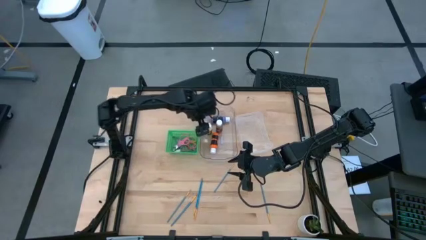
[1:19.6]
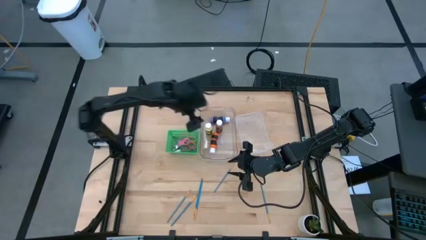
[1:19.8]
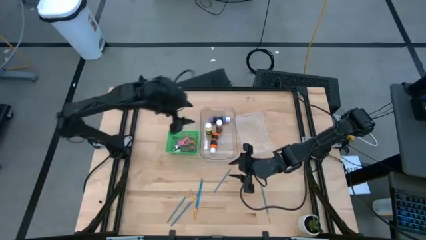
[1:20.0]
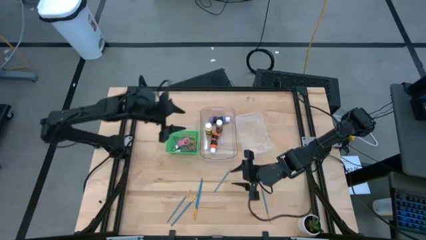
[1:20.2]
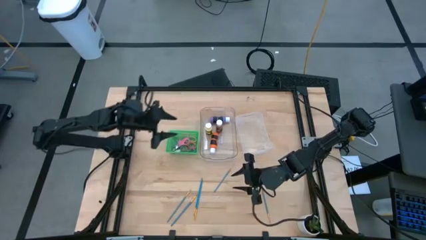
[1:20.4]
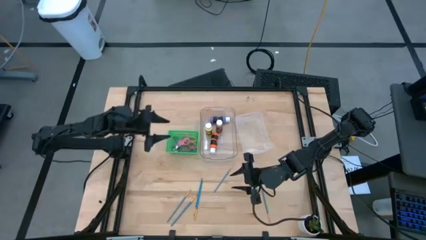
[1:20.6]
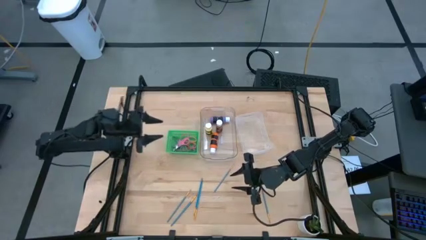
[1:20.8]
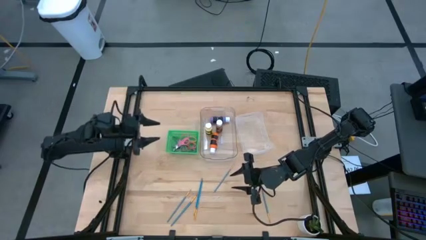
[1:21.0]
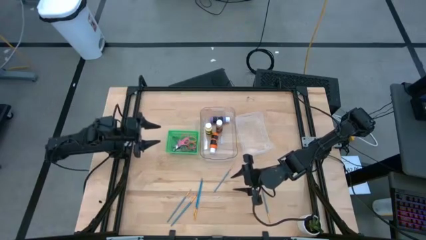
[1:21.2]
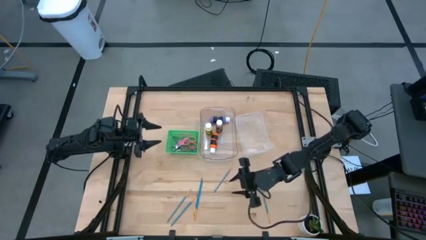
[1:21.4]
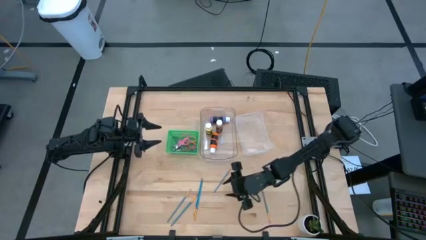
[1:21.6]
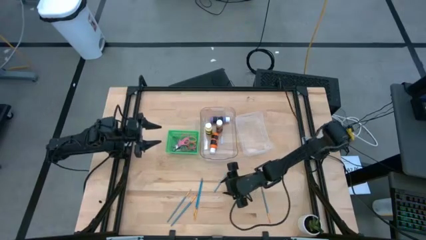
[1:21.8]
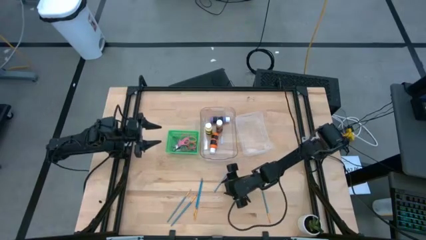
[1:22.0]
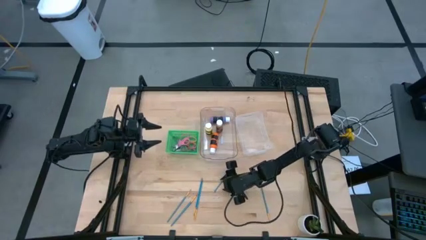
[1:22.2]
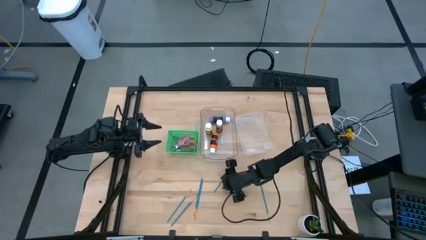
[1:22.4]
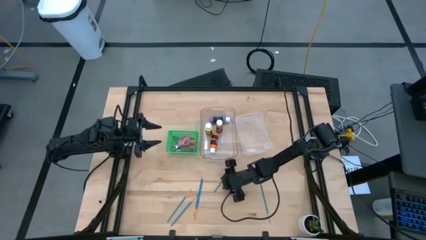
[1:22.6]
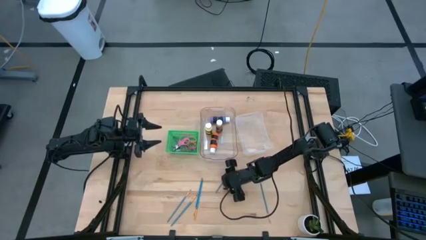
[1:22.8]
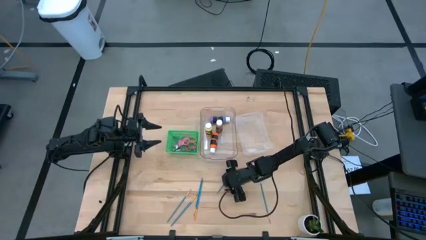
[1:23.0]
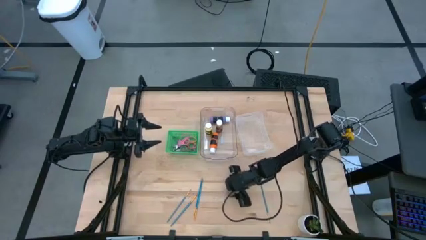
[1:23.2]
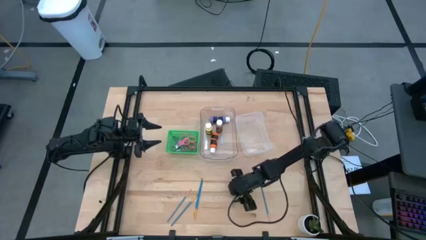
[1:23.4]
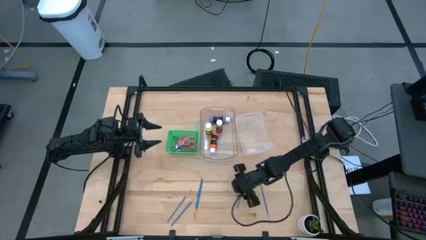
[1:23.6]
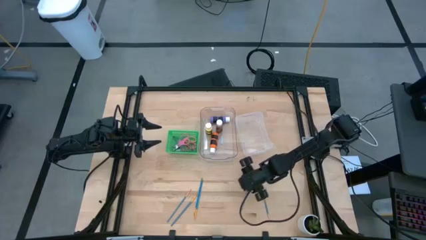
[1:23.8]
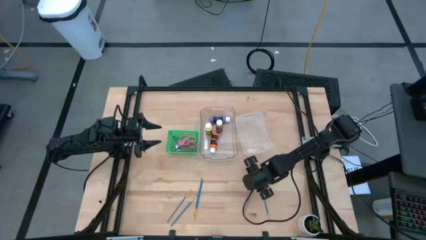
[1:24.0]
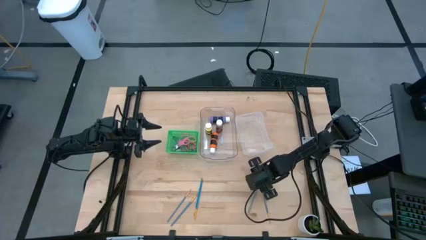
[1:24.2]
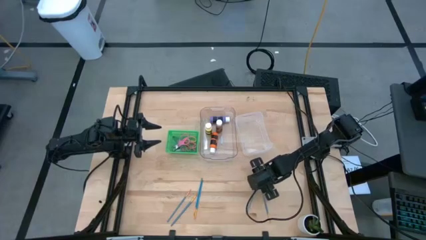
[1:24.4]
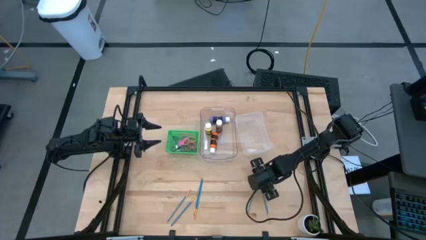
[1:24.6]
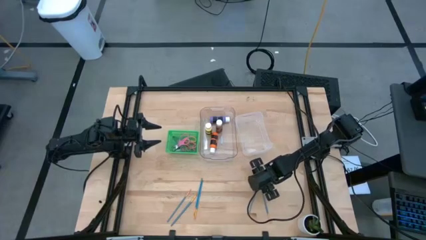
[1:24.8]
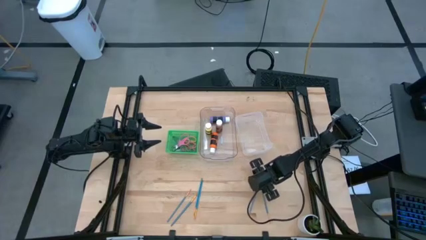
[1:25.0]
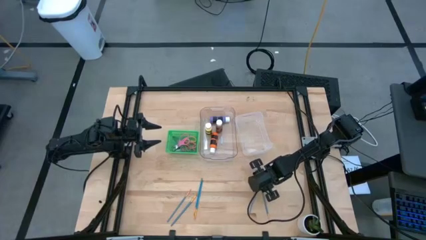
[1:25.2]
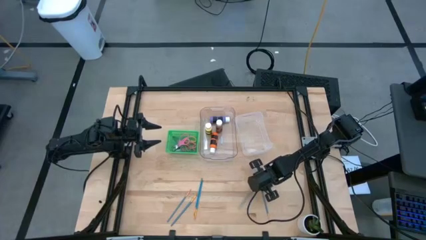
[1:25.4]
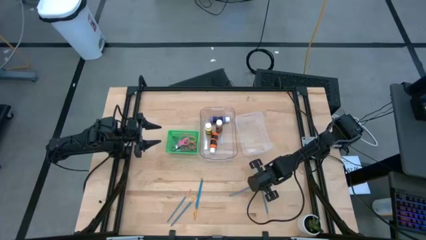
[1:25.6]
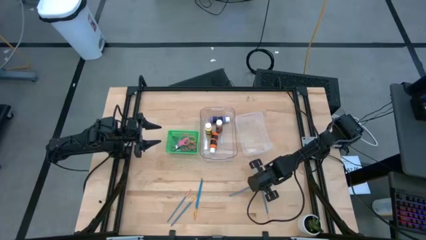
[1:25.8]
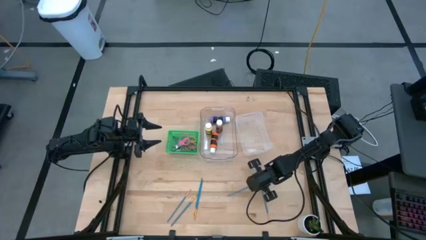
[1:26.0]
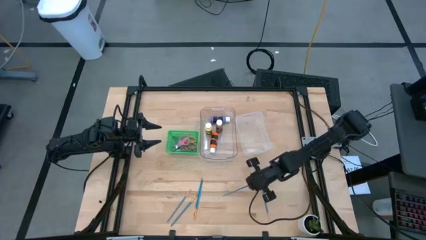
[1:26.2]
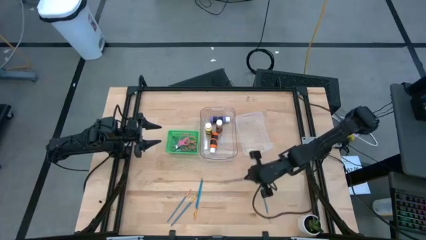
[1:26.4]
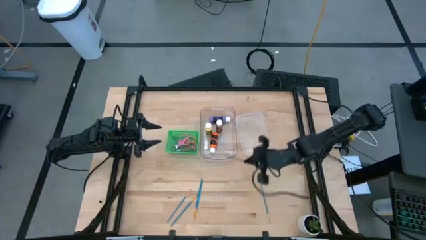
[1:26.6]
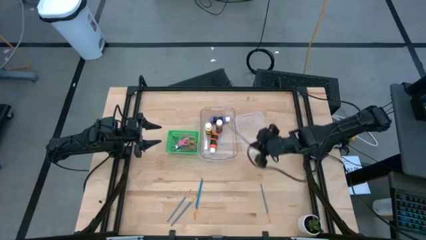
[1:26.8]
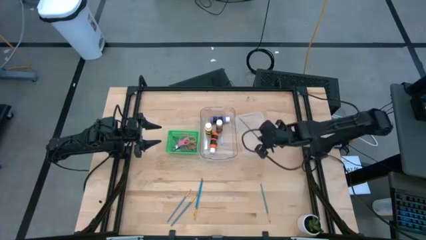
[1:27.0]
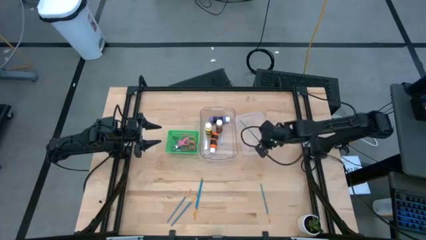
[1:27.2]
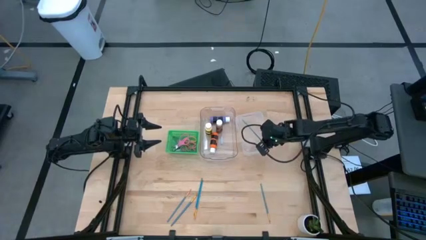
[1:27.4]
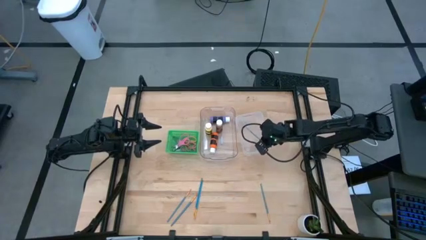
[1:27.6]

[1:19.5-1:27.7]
Task: Pick & Place Paint Supplies
Put the blue paint brush into the white bin

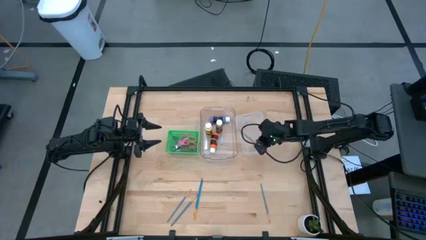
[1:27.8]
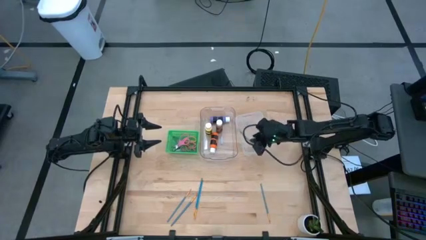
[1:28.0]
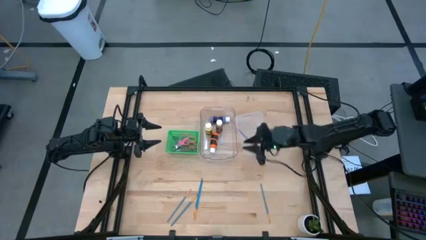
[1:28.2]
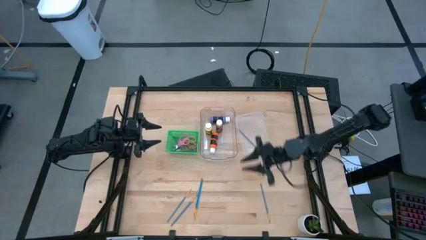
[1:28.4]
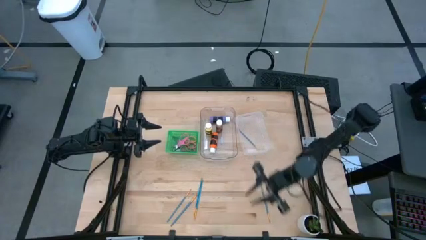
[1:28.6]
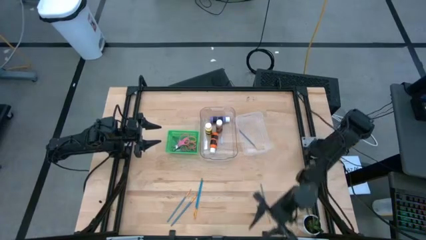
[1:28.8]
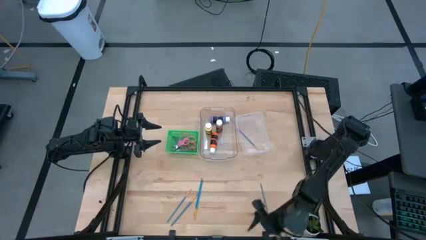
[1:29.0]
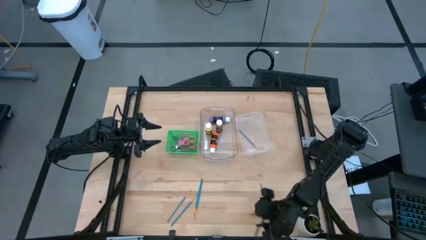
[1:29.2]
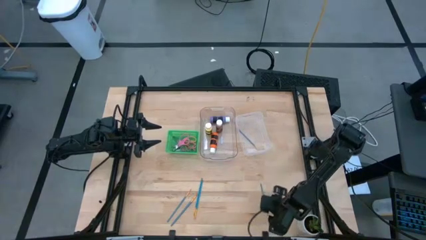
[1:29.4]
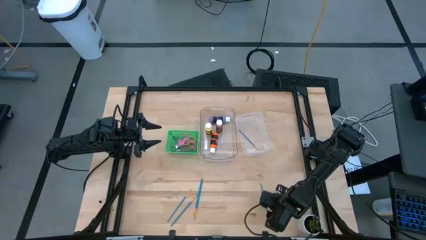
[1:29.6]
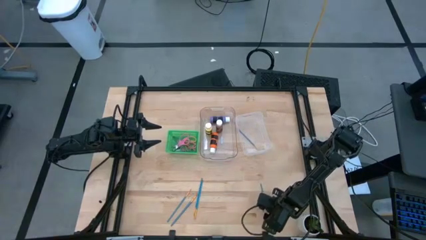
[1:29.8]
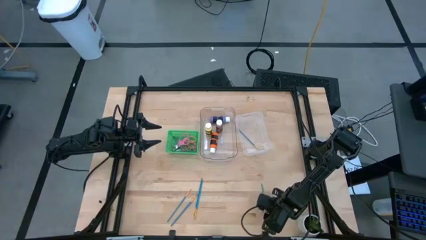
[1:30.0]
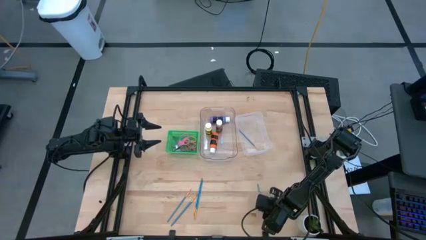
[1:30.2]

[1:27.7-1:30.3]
Put the blue paint brush into the white bin

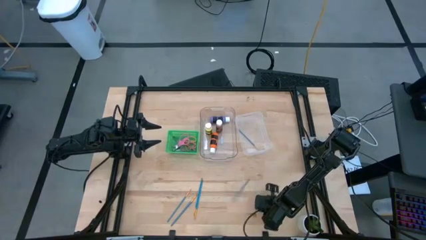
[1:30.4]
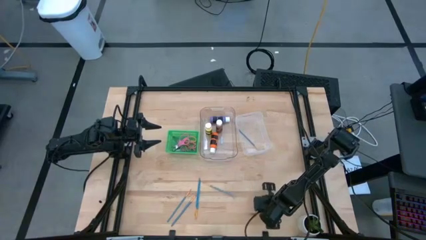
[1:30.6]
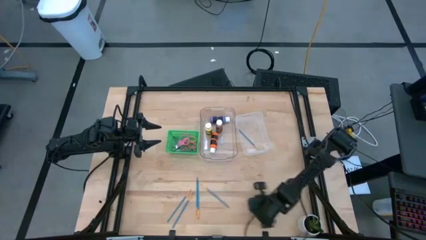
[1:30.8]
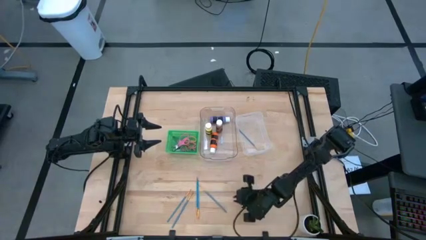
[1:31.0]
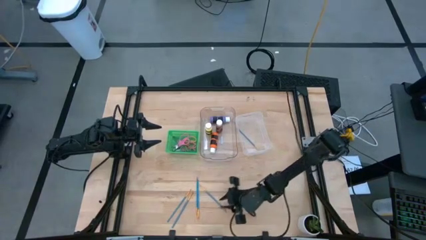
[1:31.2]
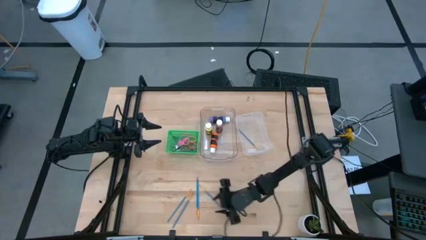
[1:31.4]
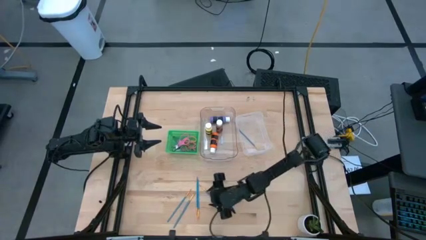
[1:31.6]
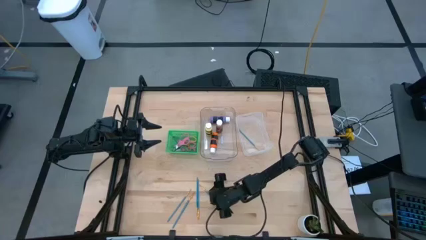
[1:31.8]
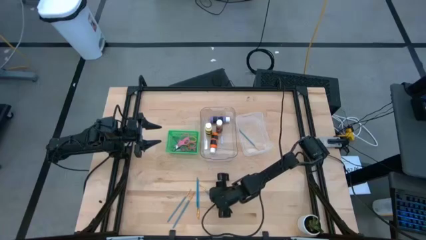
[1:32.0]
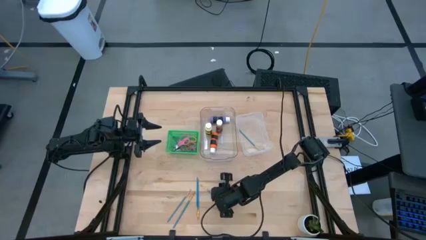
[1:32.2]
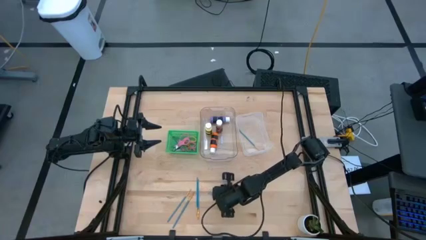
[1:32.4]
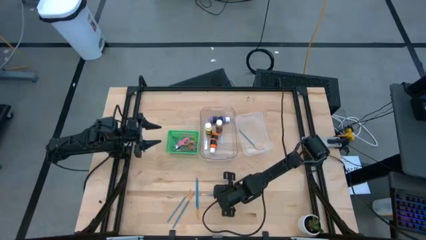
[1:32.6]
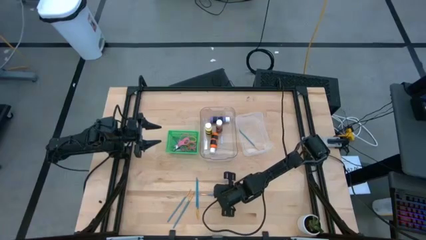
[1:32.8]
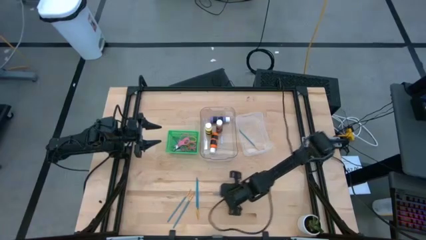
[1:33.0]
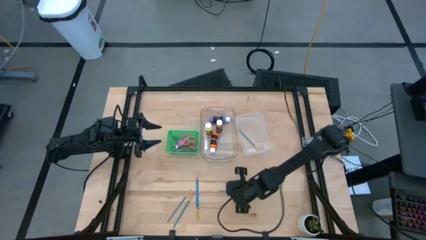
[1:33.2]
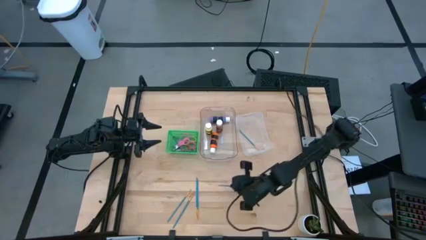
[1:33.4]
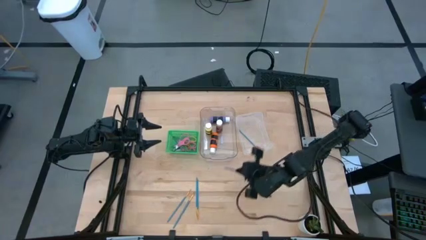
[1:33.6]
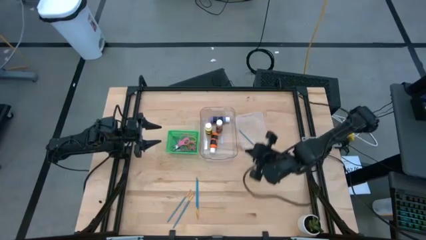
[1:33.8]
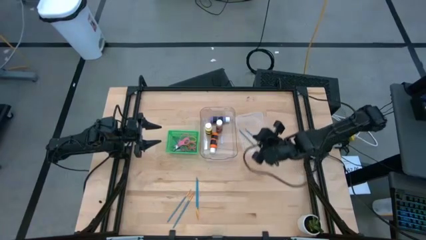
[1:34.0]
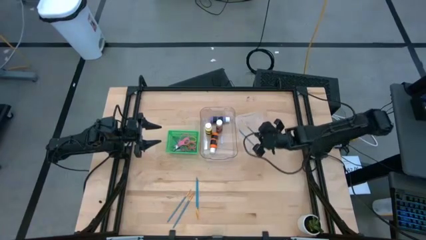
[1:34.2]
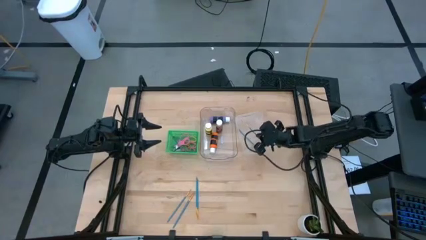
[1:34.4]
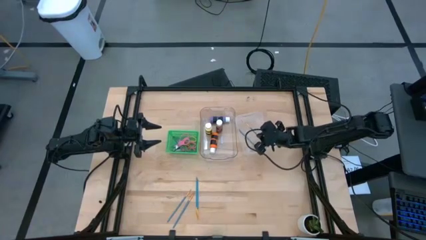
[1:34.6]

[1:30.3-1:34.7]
Put the blue paint brush into the white bin

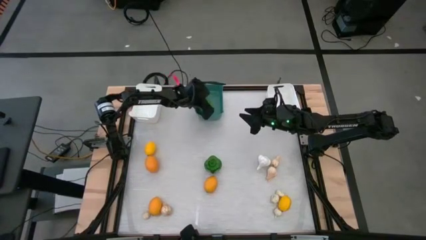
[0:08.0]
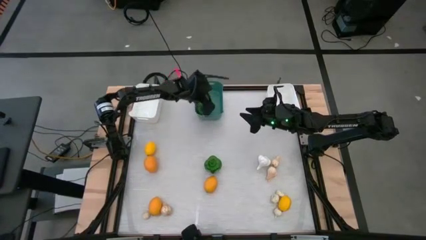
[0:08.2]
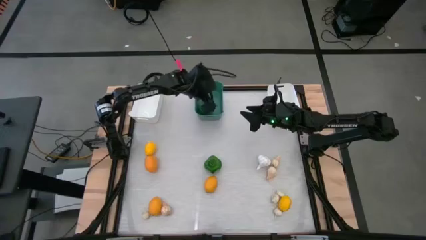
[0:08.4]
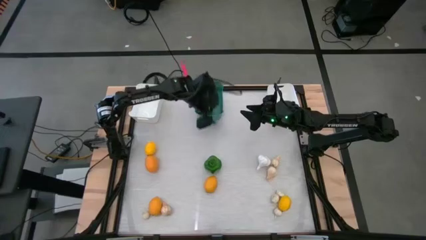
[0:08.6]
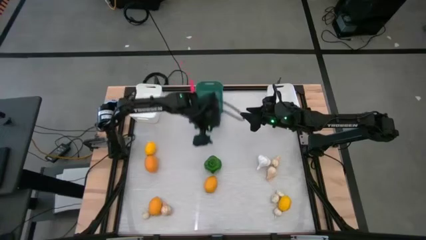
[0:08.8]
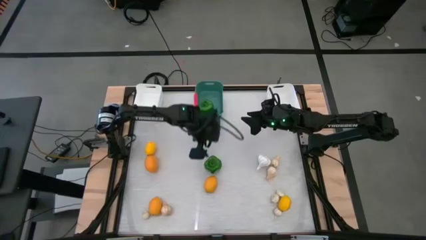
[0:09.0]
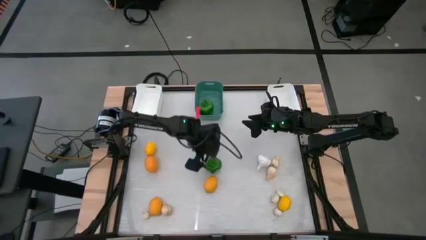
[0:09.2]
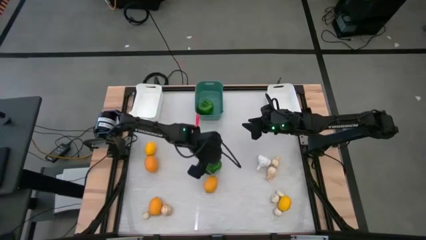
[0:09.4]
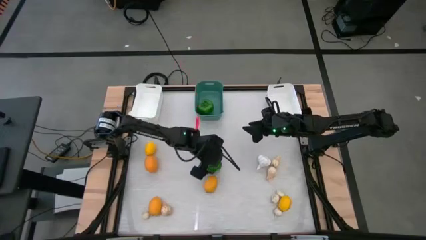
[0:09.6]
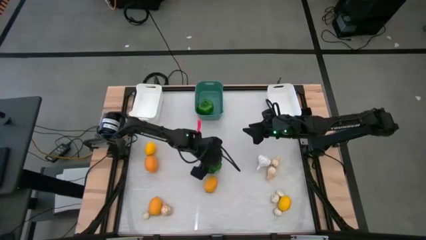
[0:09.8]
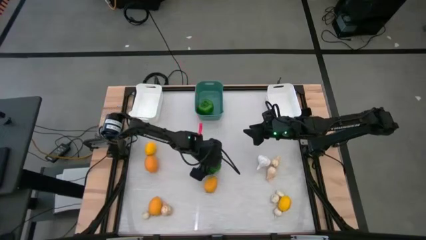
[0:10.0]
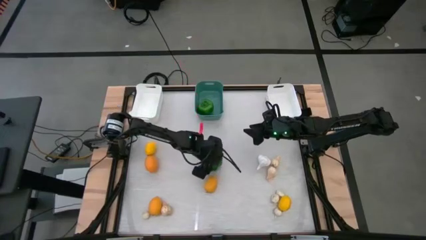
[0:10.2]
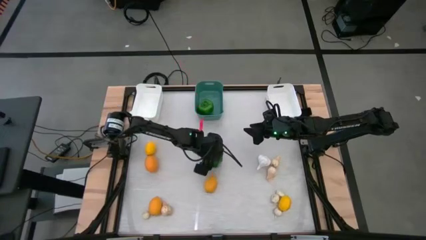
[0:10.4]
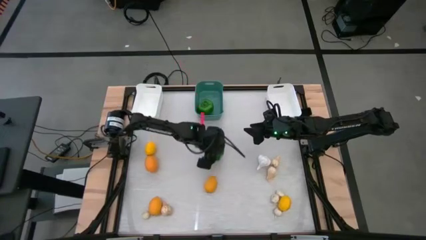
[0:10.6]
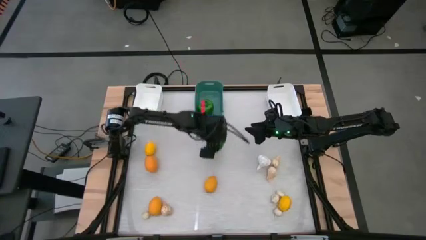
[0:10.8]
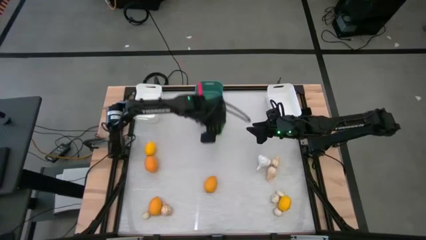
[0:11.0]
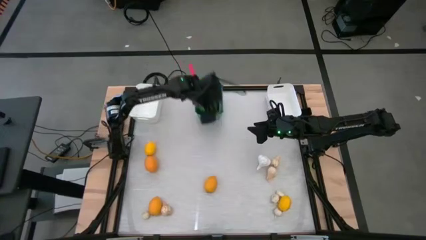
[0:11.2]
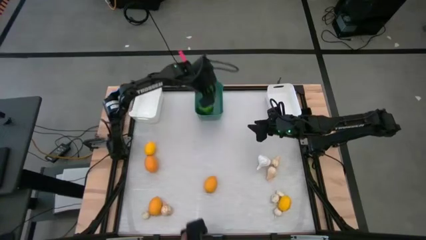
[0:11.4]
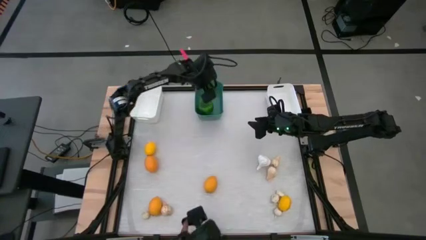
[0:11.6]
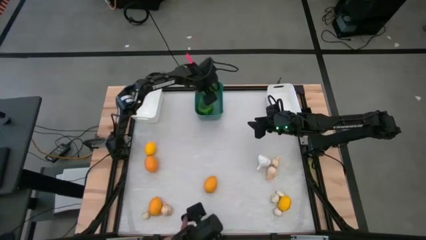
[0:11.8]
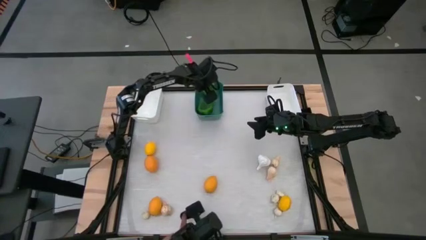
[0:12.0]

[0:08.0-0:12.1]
Task: Sort produce into baskets
Put the green bell pepper into the blue-green bin
